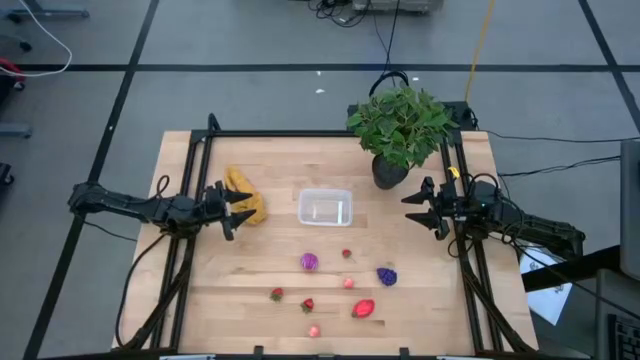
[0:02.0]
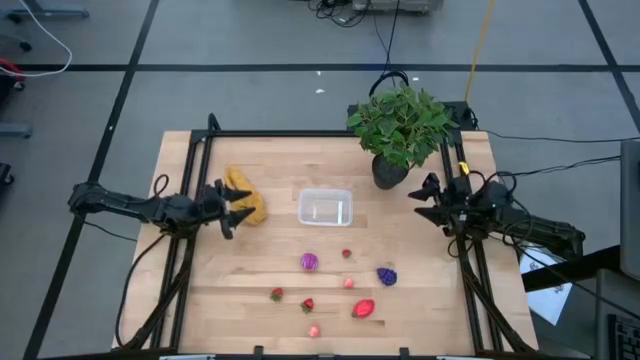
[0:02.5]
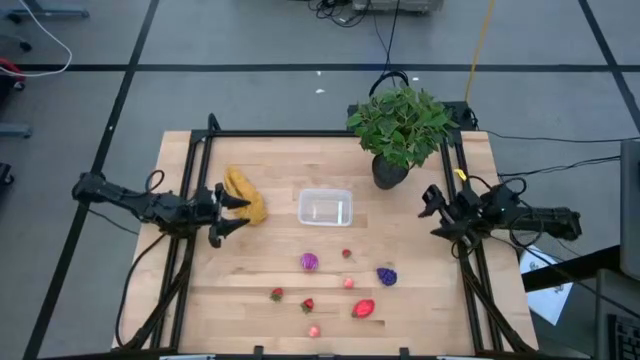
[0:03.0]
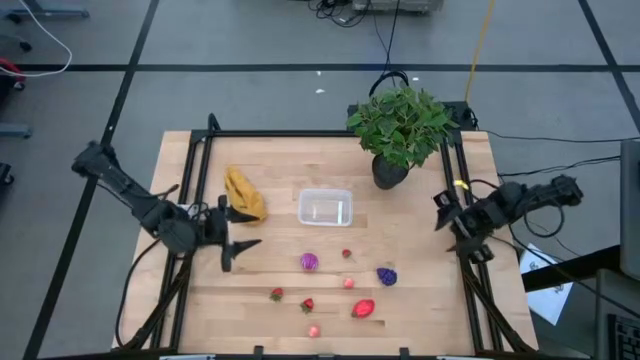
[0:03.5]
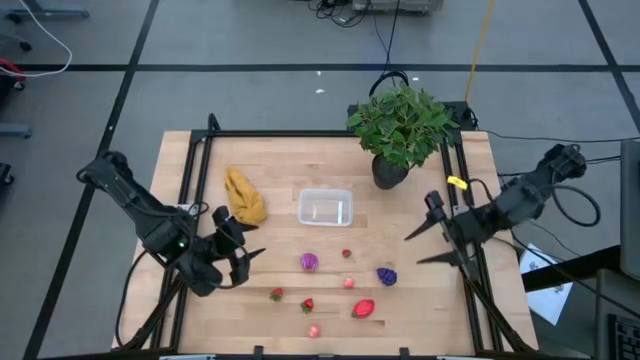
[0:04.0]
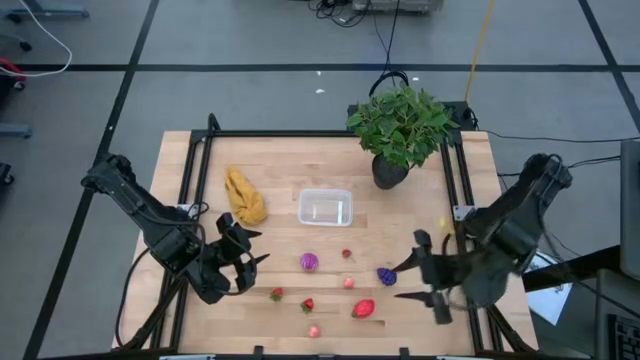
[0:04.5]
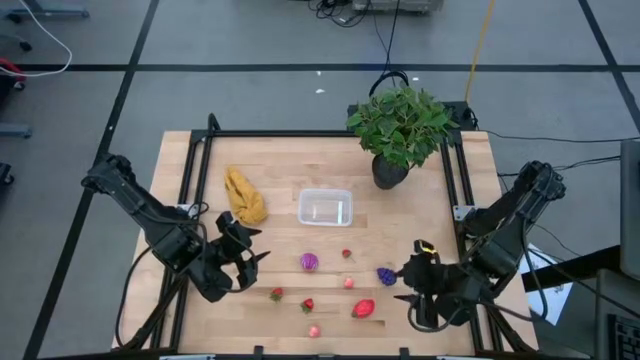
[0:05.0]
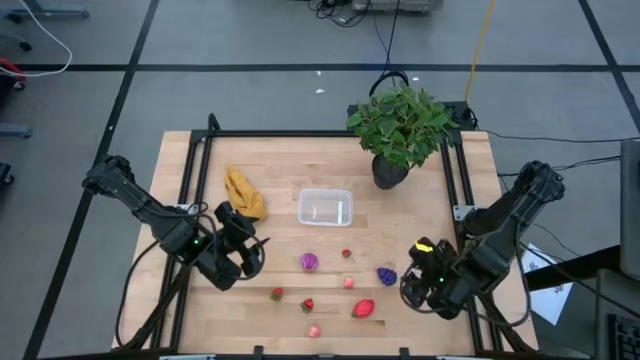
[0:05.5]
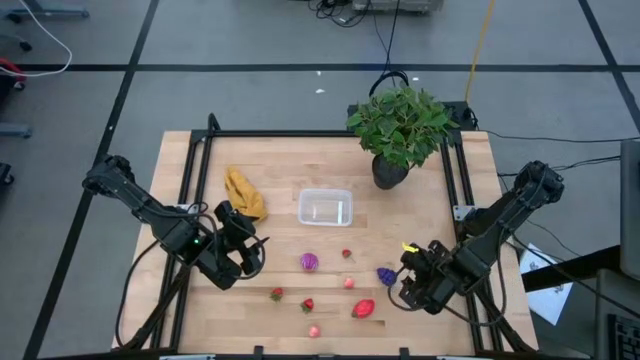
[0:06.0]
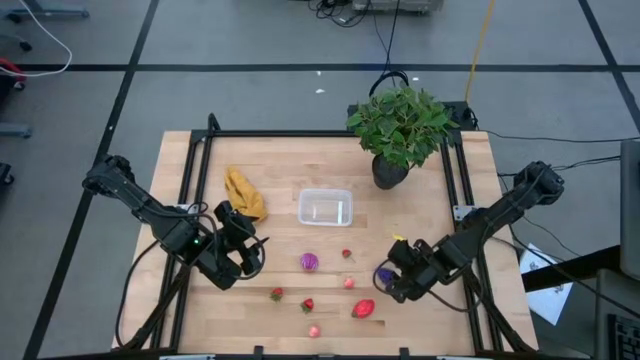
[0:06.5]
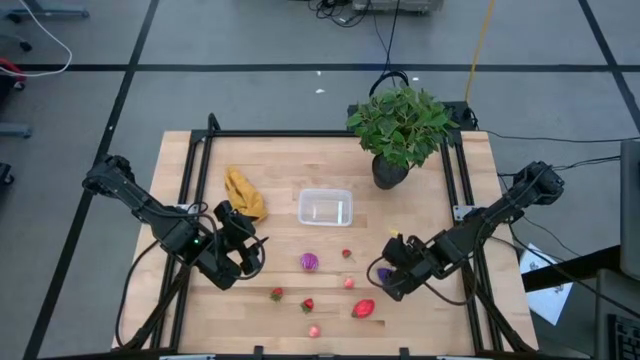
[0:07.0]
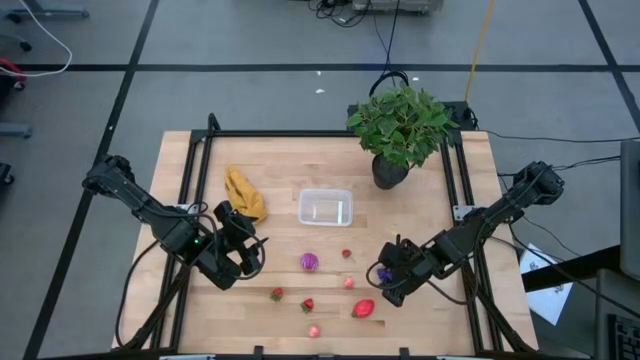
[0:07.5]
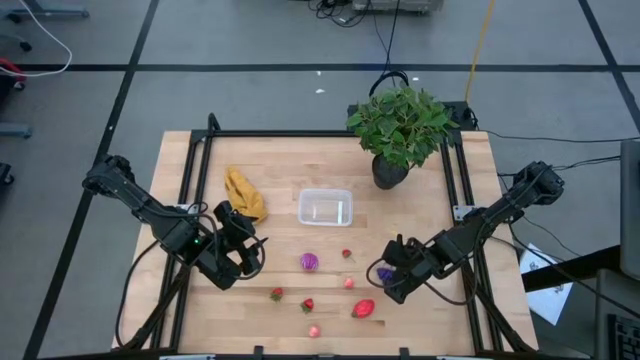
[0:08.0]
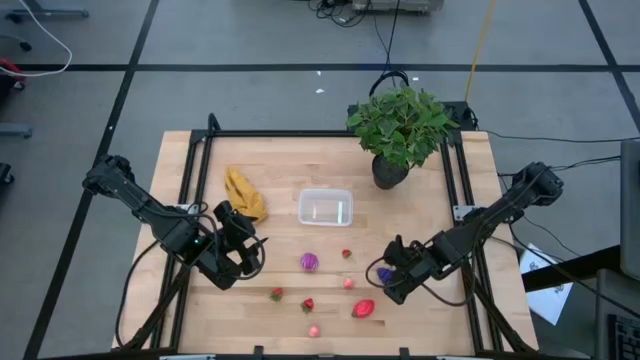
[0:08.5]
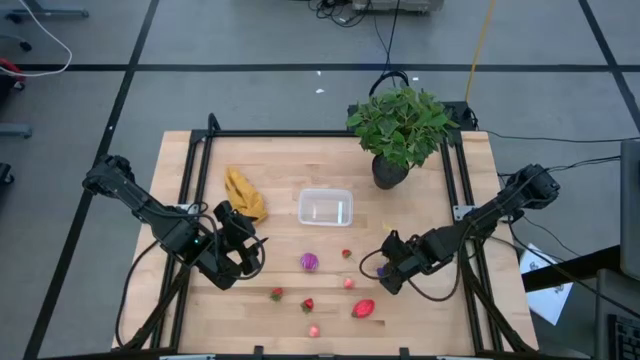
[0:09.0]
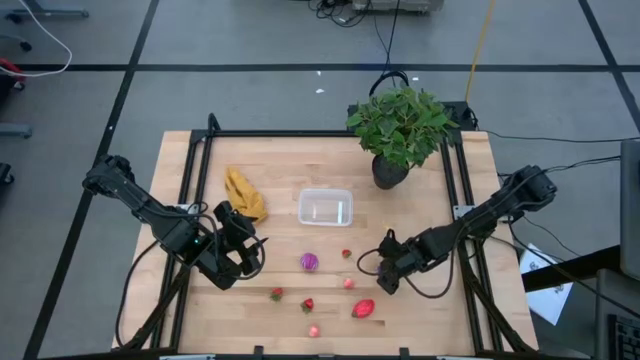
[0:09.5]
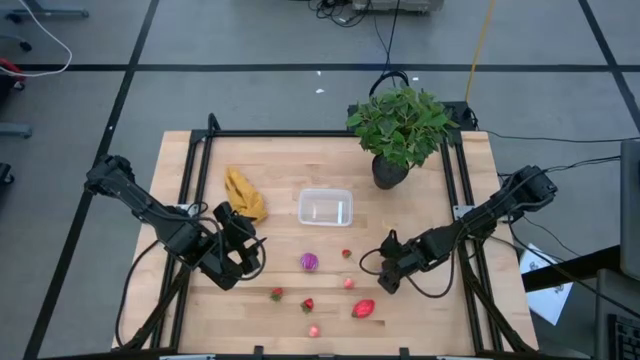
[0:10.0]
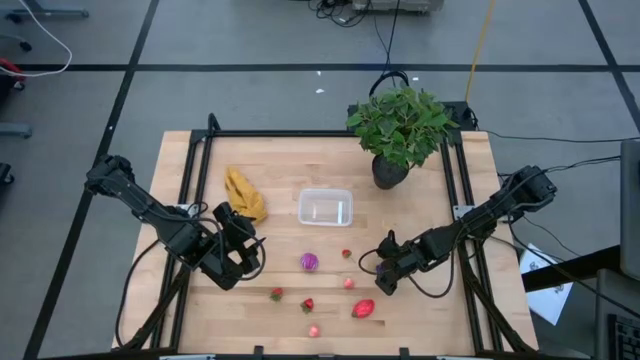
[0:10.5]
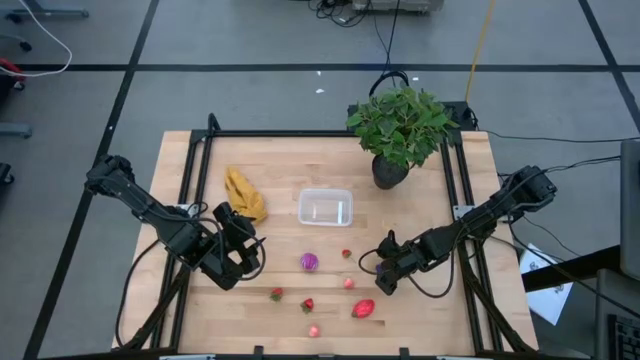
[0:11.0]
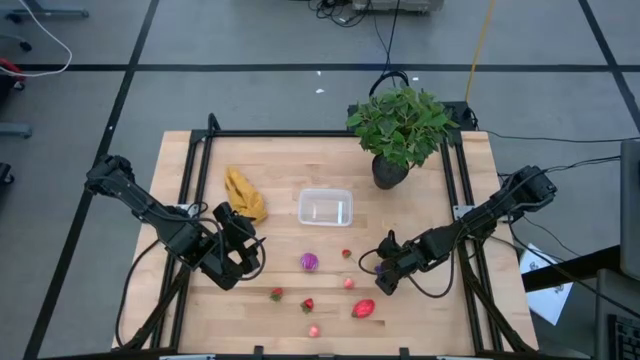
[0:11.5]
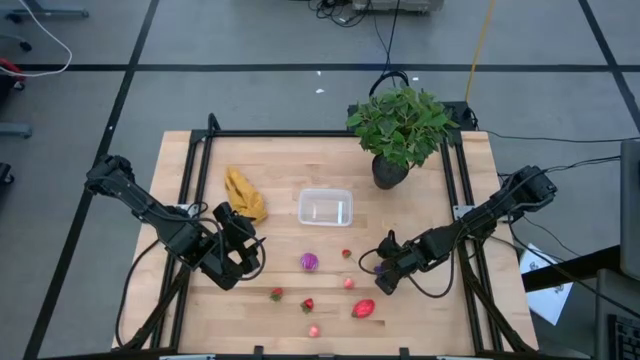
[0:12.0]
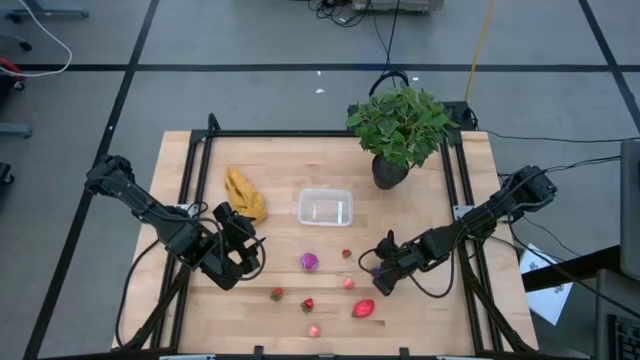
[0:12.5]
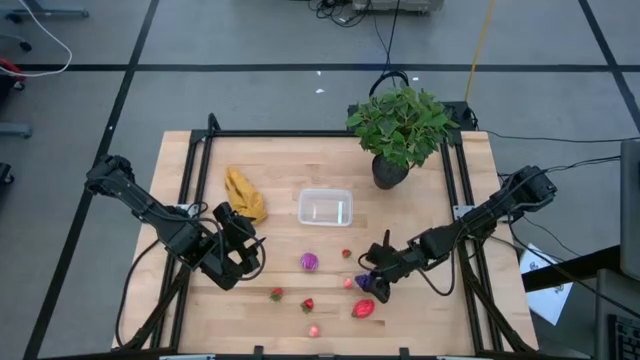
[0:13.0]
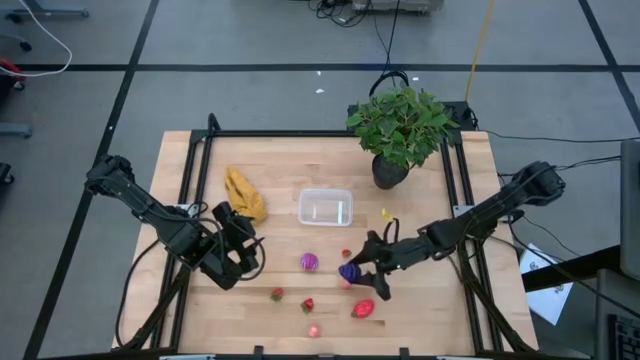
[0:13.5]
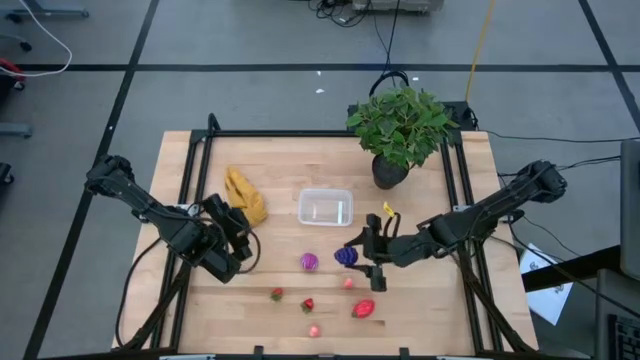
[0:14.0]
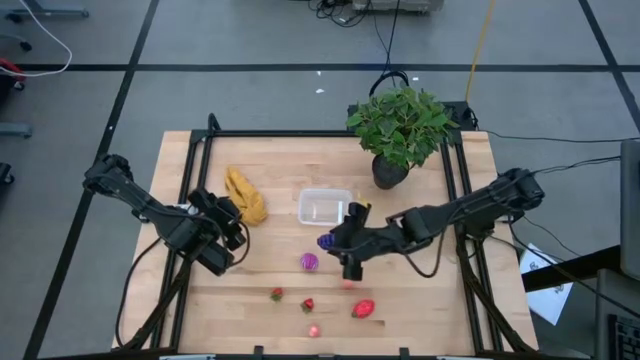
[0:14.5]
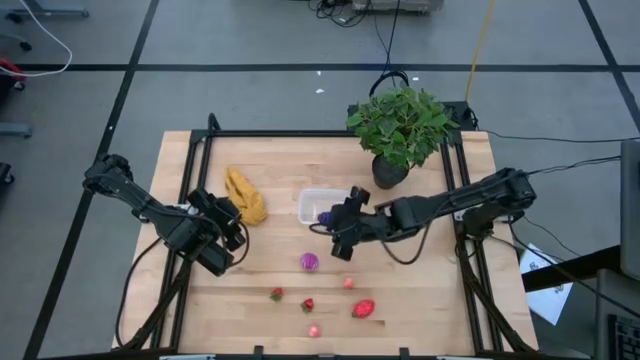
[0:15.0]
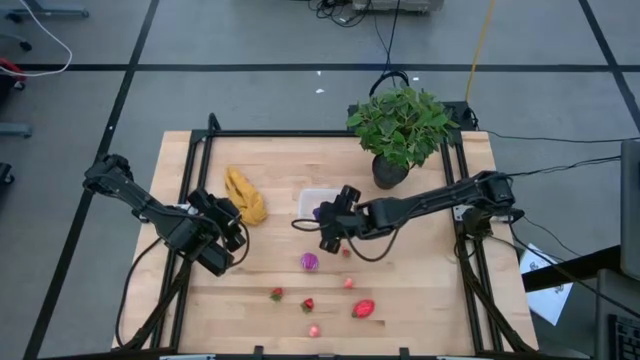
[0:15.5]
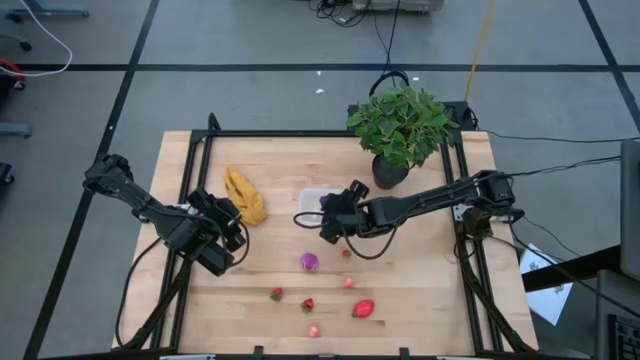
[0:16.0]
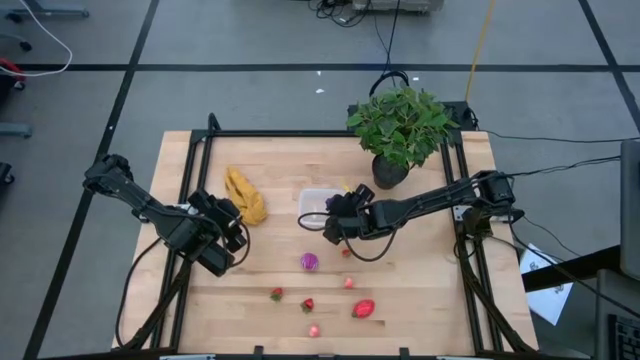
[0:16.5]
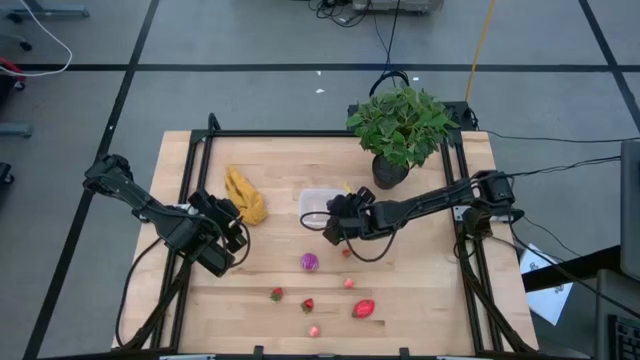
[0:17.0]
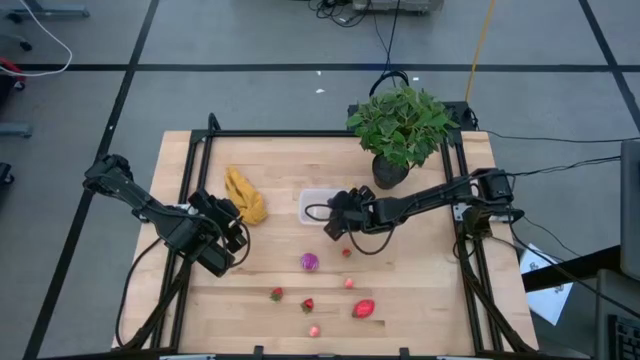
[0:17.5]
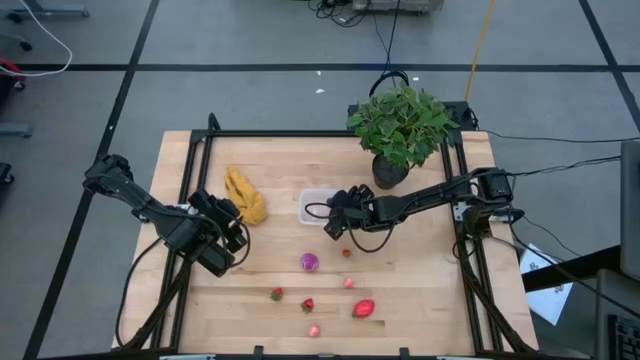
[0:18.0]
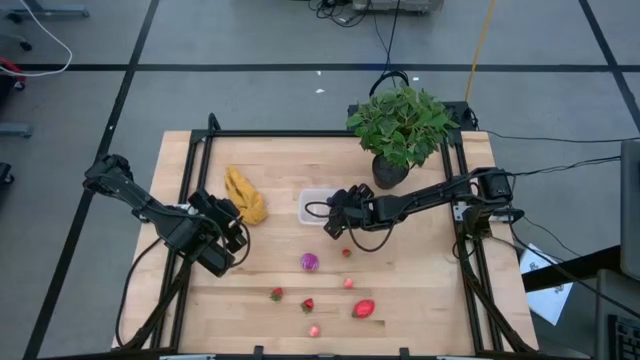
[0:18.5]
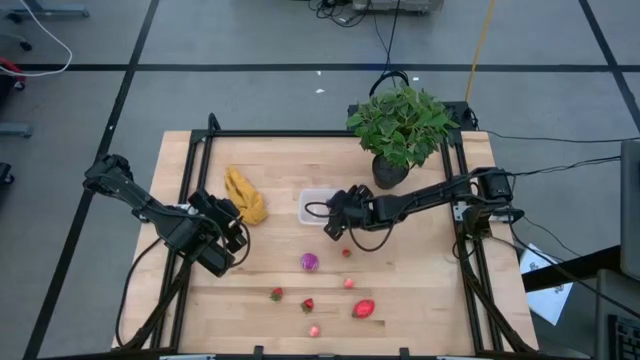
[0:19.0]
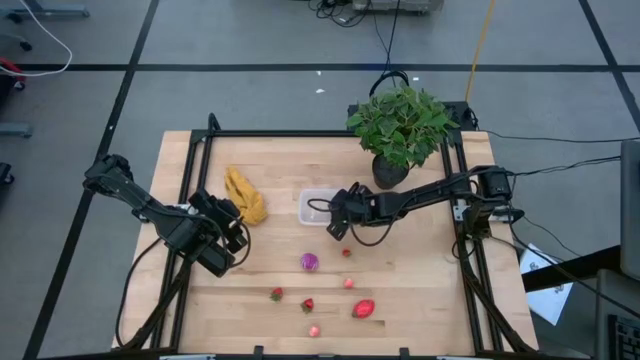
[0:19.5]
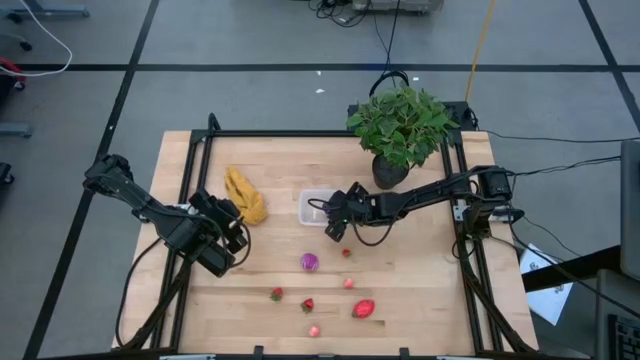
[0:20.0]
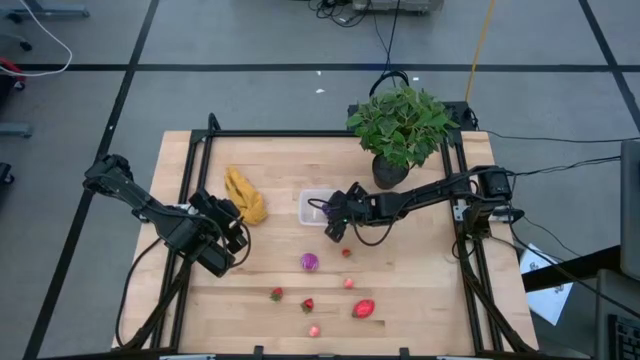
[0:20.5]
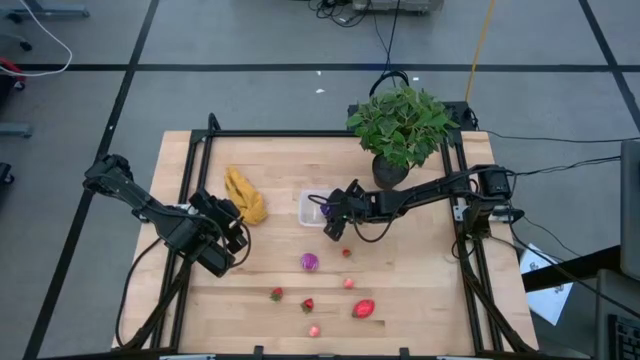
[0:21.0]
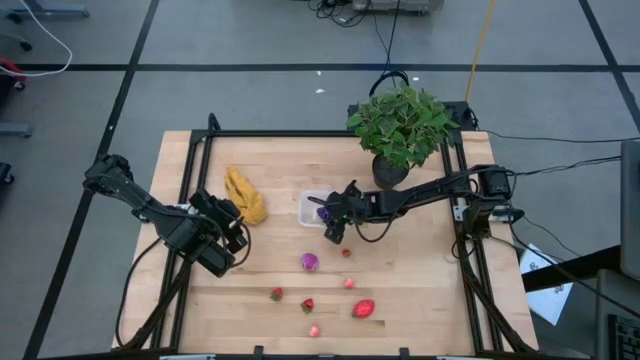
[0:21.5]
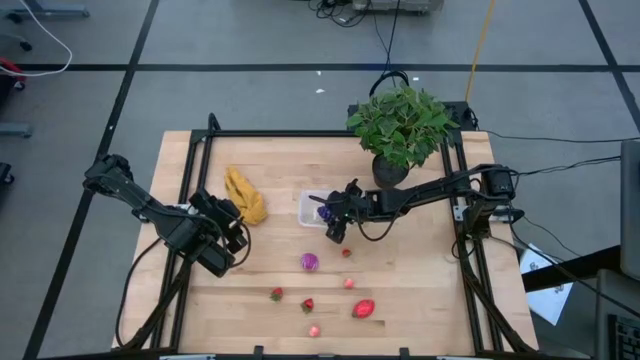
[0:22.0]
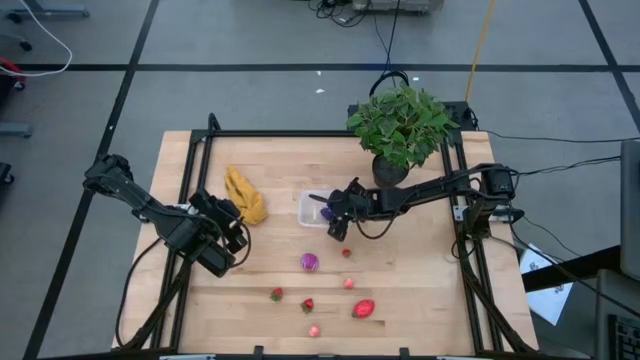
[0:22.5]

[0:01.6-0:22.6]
Task: Pick and placing Produce into tupperware
Put the violet raspberry into the transparent bin

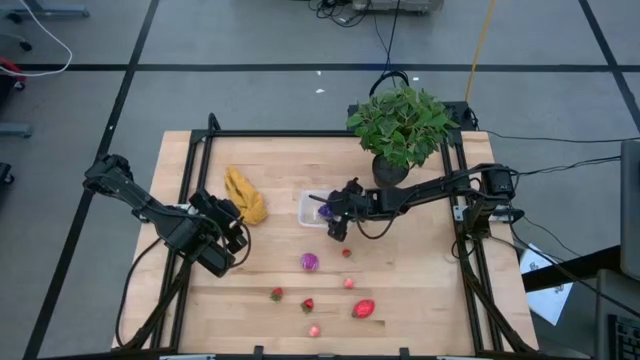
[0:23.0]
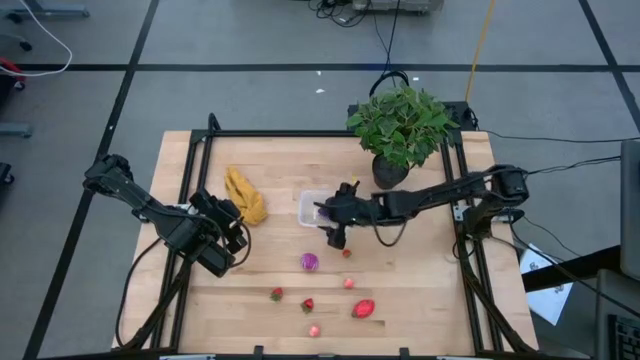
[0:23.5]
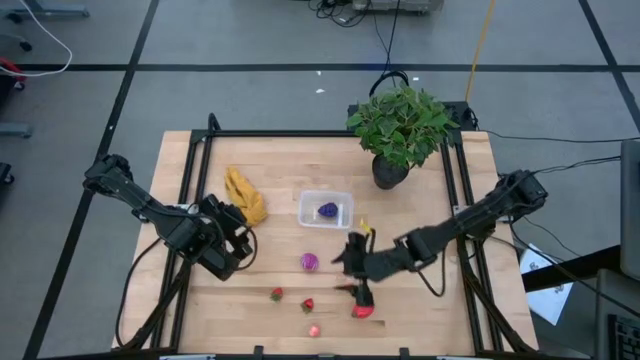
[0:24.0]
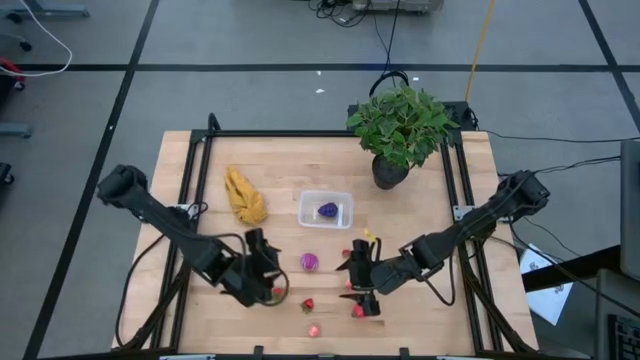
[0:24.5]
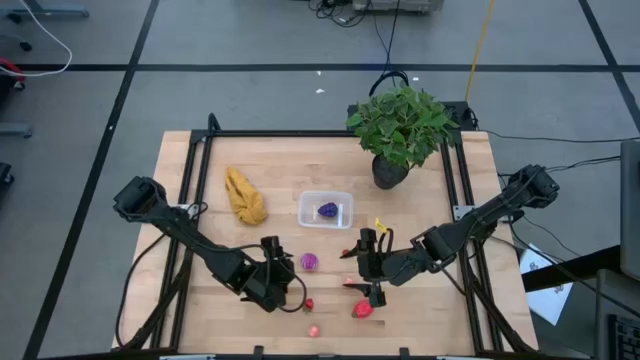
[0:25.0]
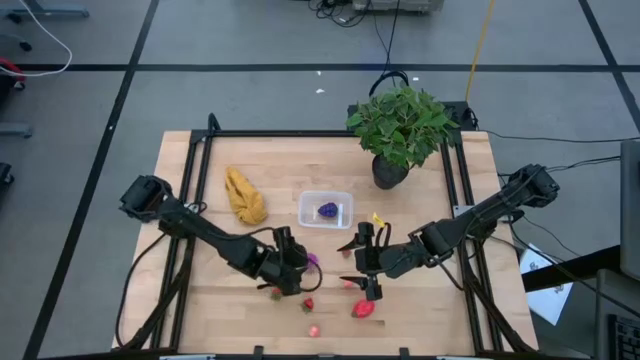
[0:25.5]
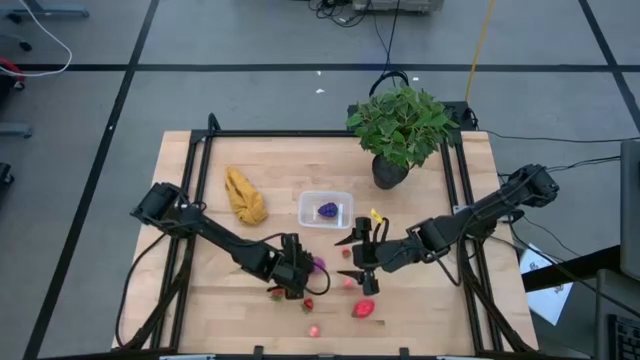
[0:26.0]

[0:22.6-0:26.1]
Put the purple onion into the transparent bin
